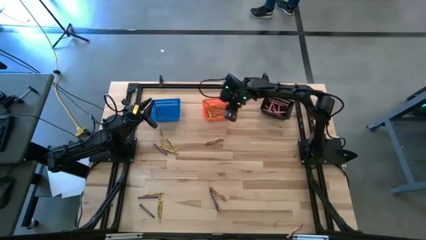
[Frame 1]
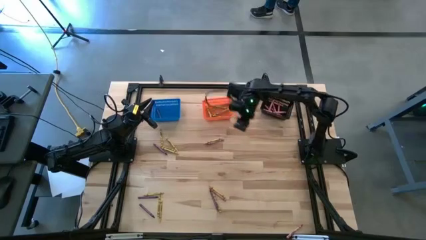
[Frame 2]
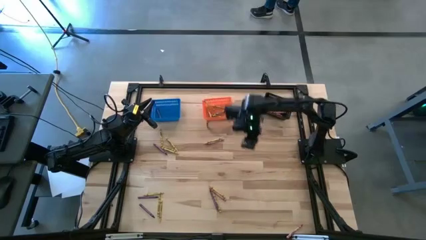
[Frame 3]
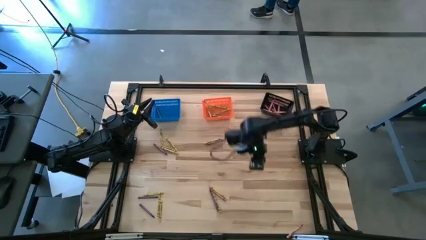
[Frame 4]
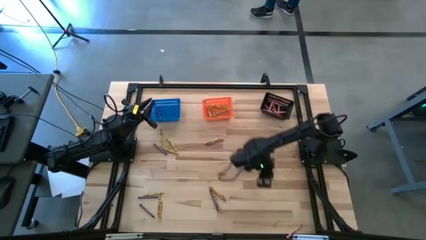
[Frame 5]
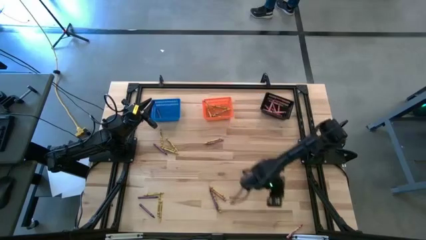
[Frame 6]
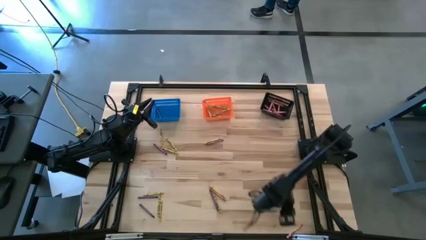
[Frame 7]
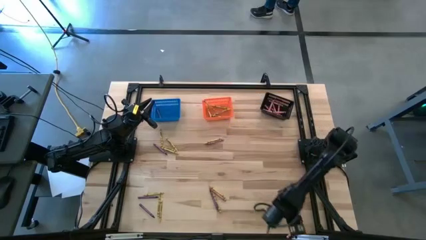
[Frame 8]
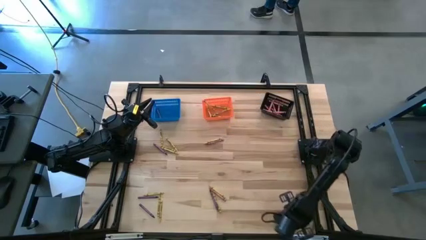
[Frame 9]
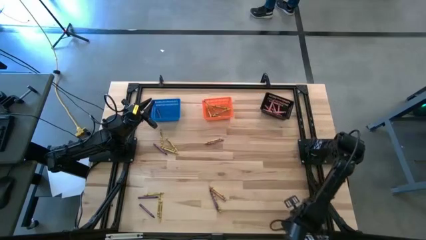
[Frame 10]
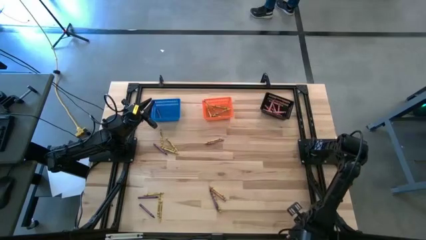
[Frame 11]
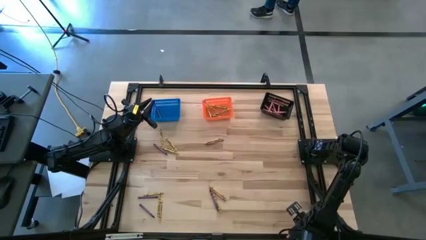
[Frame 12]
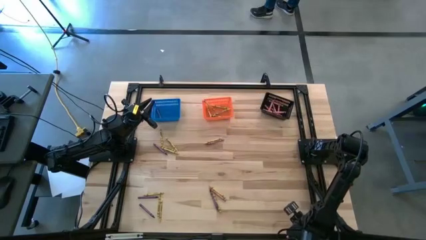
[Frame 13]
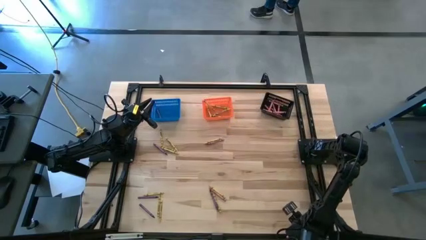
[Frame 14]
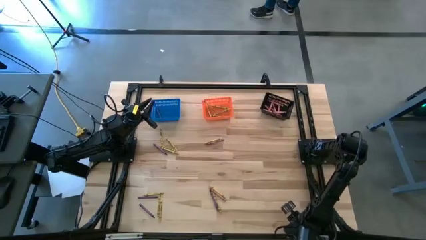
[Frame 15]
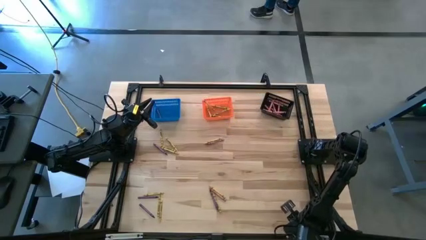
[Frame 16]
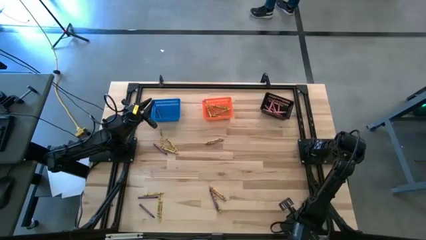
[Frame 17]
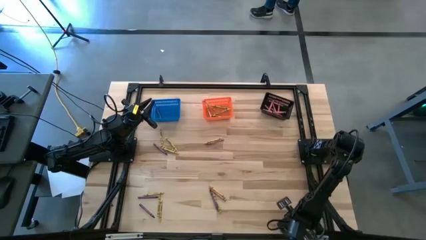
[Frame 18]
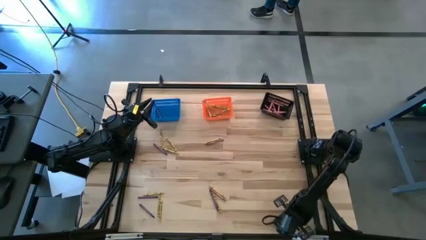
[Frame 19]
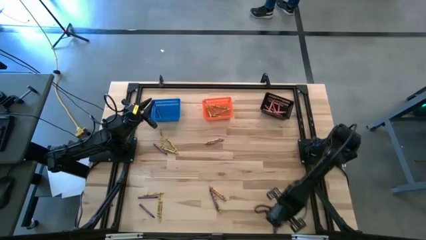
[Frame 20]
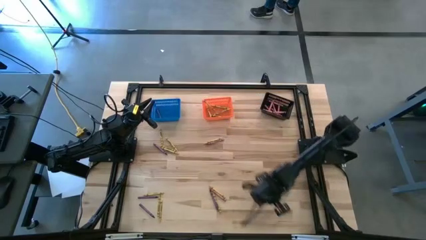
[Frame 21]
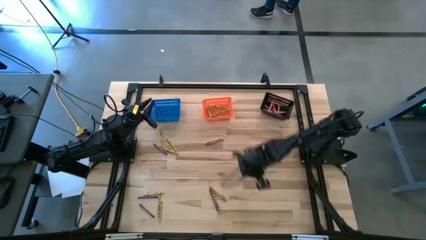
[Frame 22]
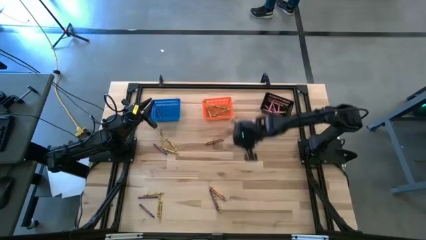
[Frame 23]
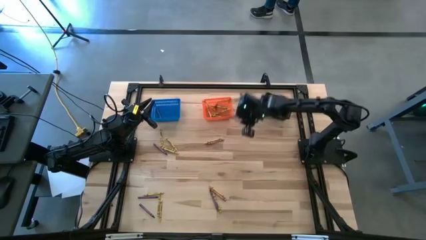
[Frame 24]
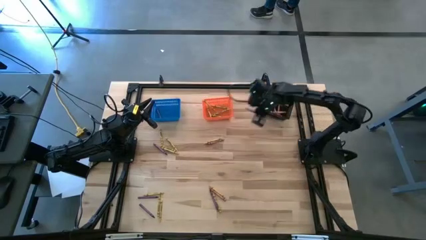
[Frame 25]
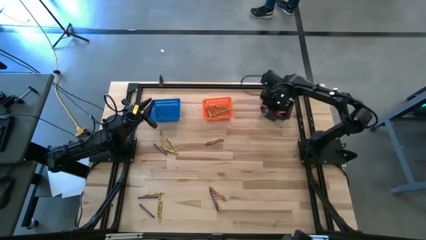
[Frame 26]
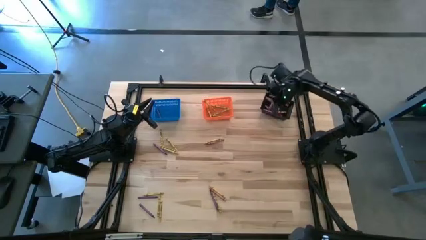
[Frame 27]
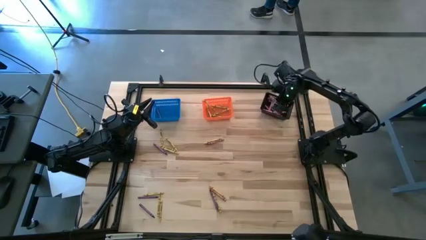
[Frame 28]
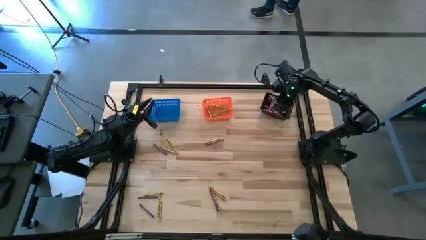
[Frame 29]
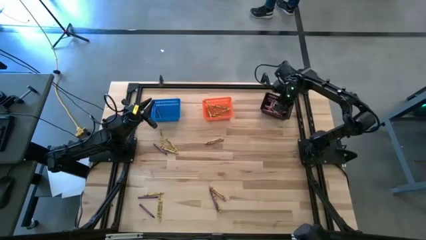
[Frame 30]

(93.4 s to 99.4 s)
Task: Sort crayons
Put the bottom red crayon into the black bin

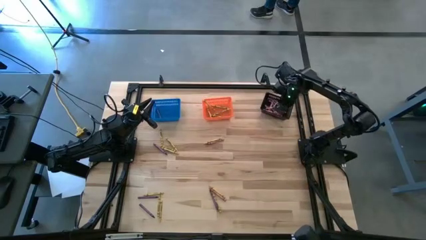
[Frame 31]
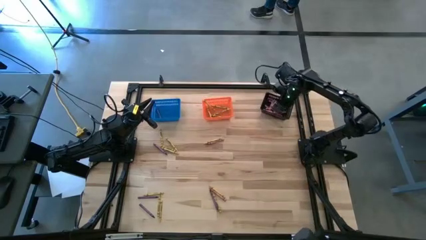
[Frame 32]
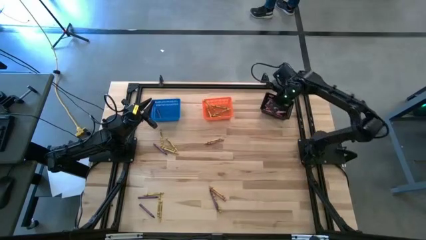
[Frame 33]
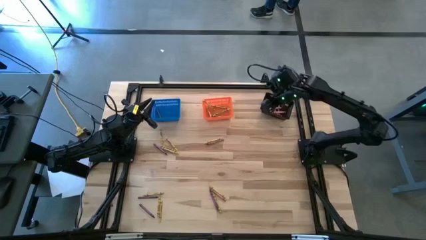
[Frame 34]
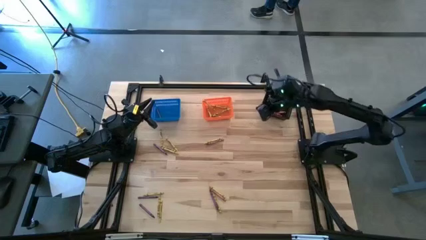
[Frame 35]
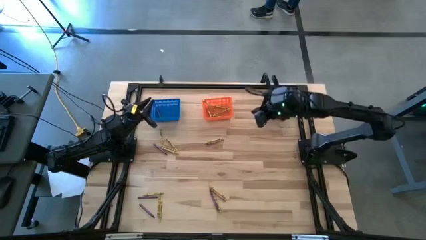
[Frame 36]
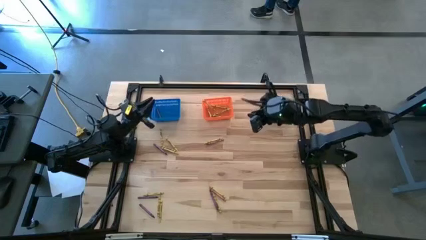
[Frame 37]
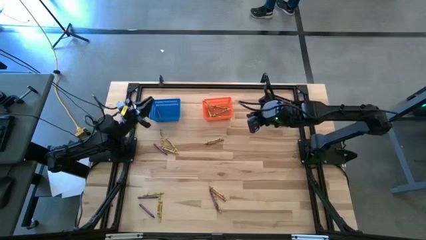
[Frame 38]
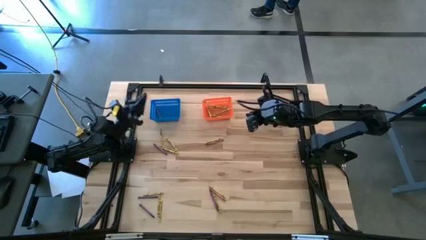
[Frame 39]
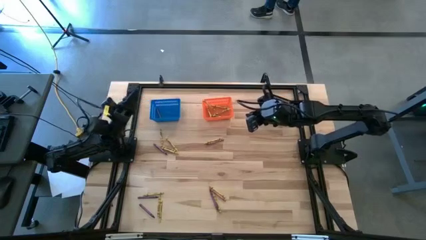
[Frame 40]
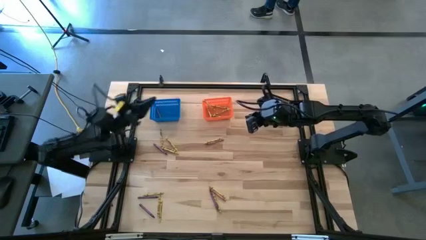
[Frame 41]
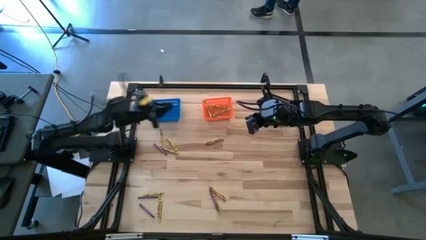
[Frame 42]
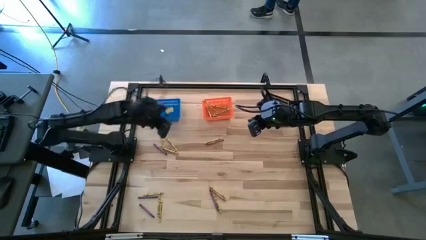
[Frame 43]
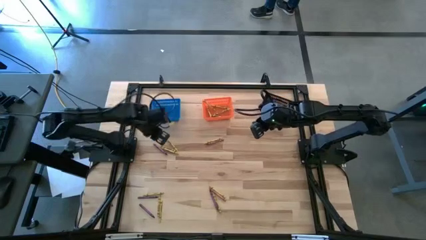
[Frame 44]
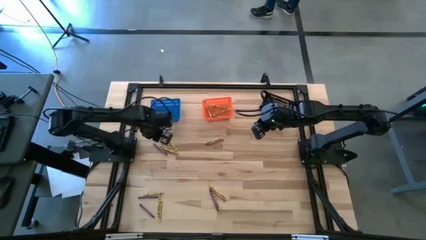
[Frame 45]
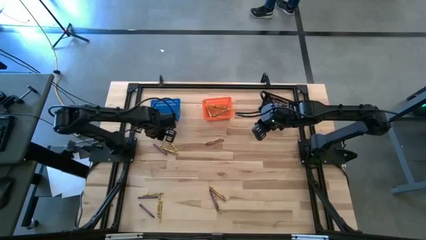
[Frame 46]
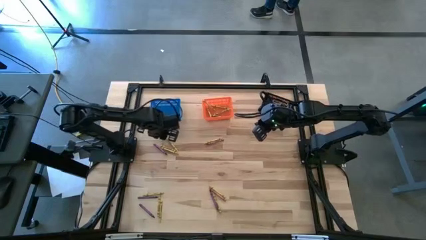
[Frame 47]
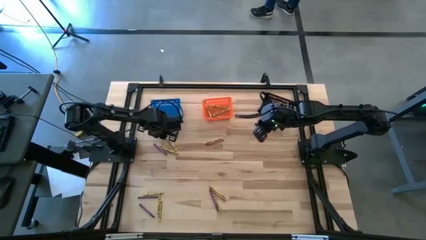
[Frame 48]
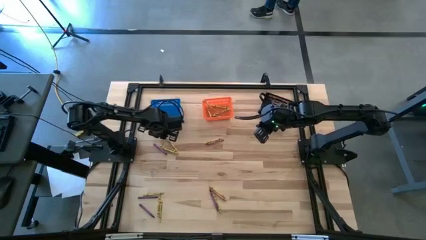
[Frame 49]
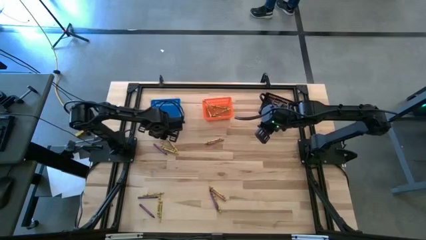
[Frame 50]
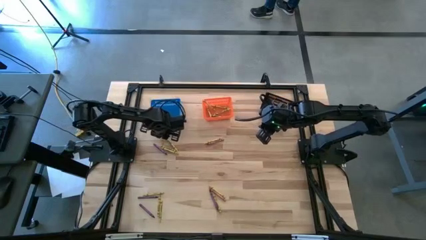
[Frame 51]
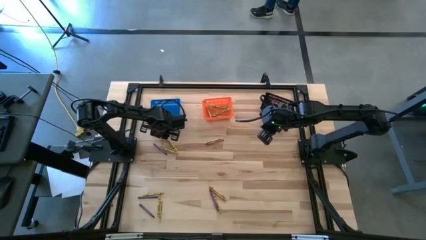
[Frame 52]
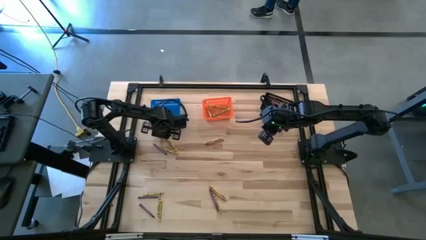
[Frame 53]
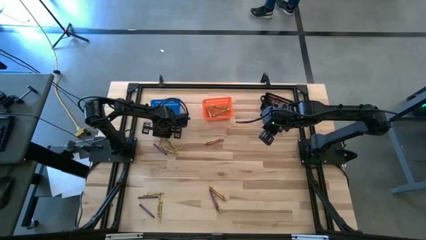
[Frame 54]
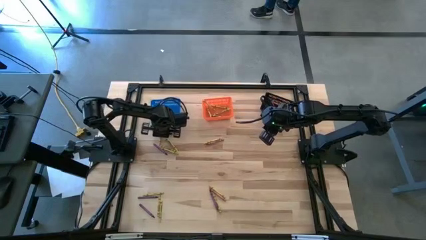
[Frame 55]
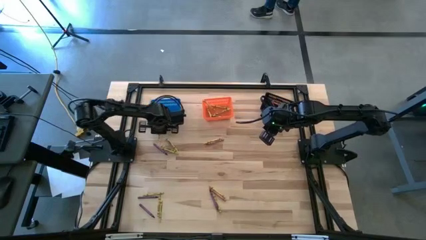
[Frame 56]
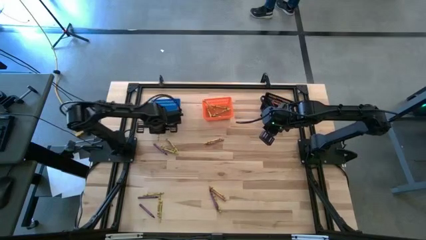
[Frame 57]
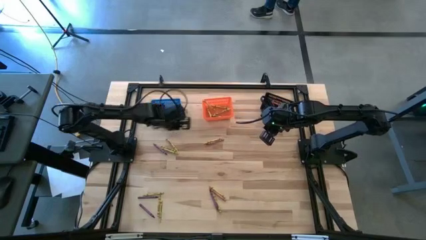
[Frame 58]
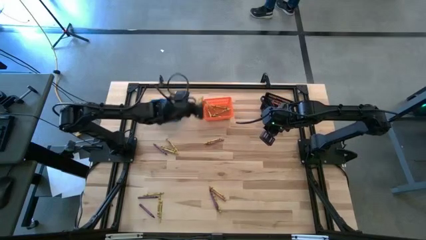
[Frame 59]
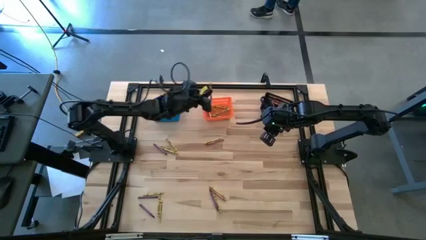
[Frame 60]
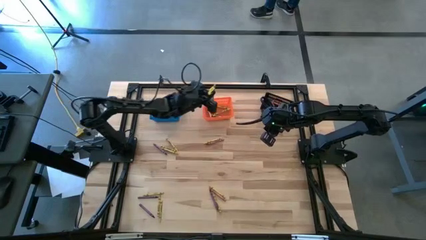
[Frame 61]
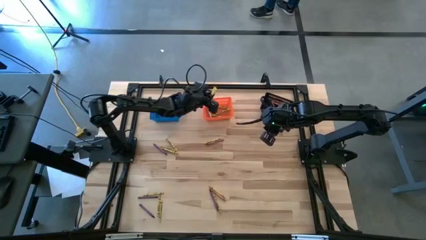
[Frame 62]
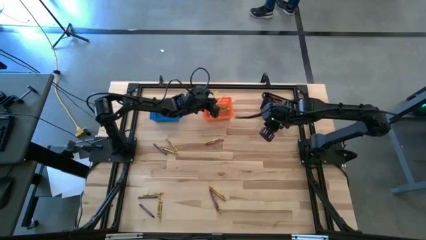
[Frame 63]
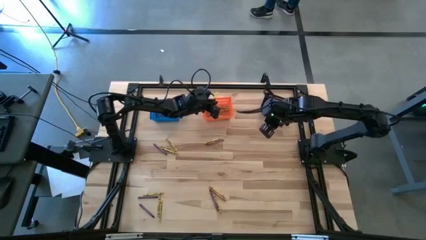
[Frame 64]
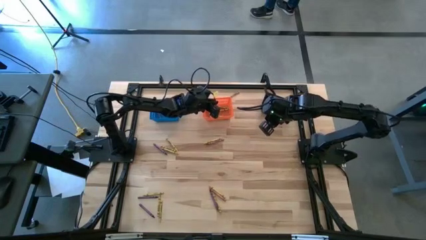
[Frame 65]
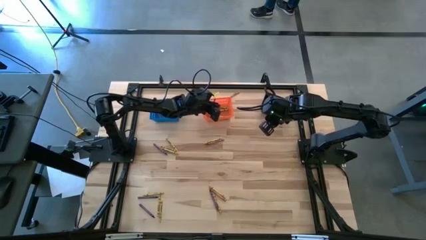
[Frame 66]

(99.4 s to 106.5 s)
Put the yellow crayon into the orange bin

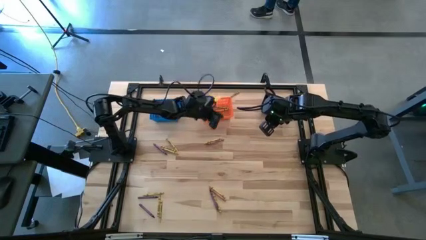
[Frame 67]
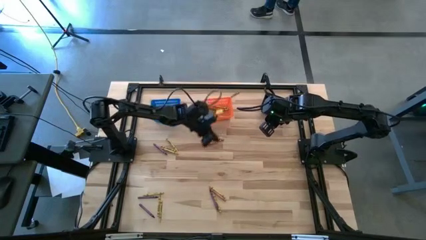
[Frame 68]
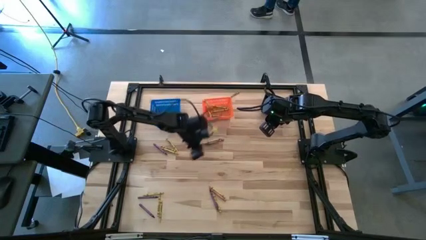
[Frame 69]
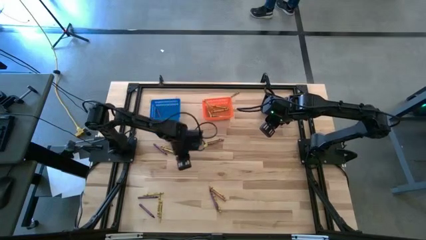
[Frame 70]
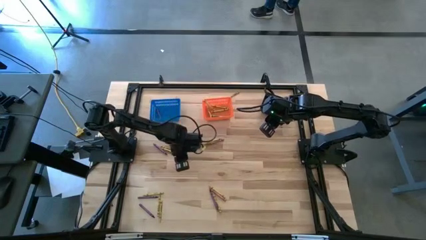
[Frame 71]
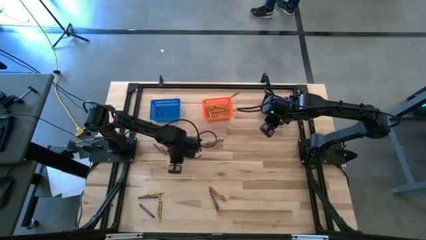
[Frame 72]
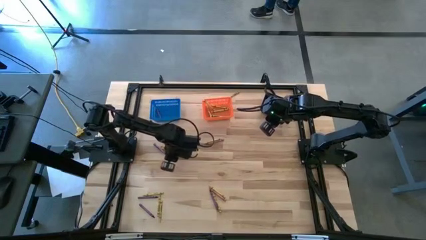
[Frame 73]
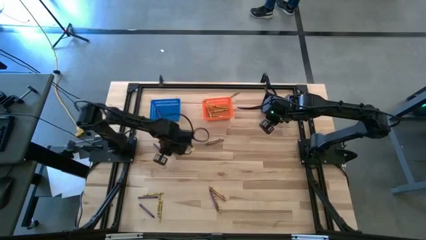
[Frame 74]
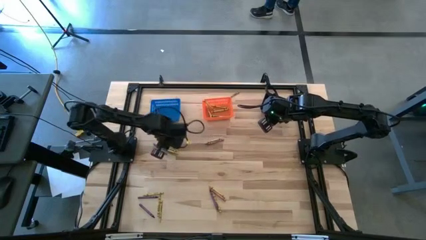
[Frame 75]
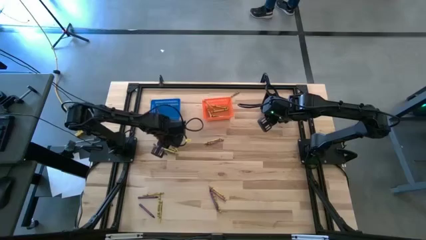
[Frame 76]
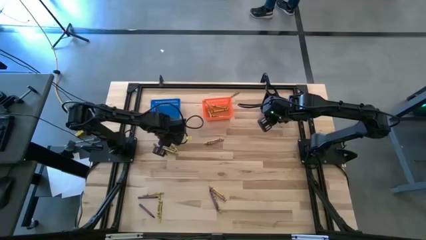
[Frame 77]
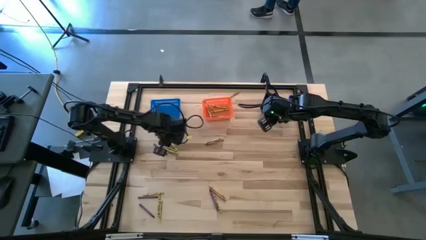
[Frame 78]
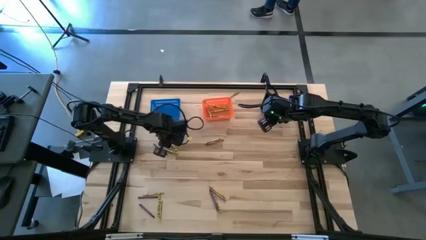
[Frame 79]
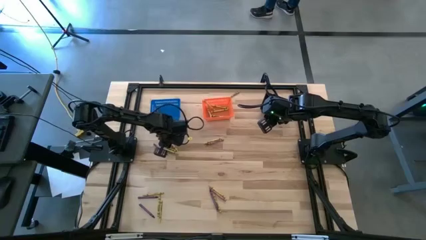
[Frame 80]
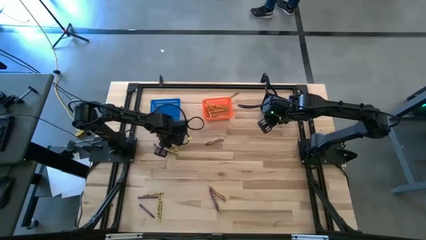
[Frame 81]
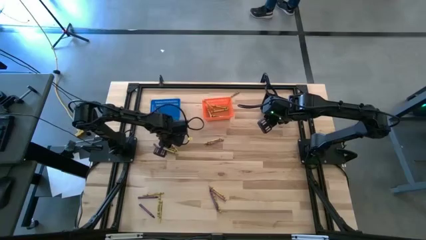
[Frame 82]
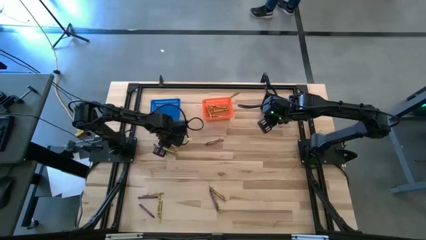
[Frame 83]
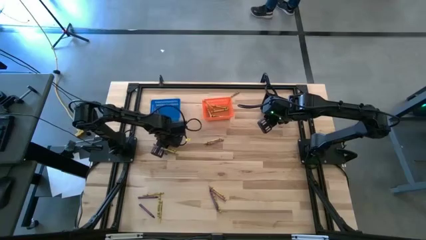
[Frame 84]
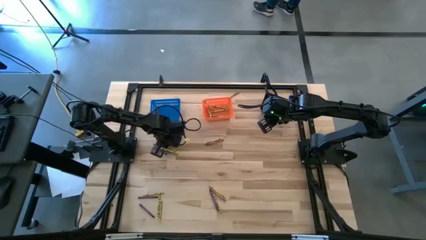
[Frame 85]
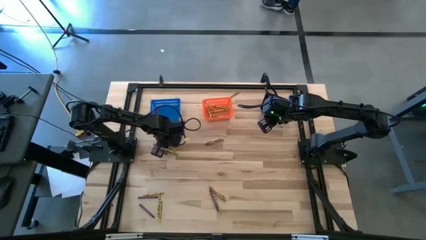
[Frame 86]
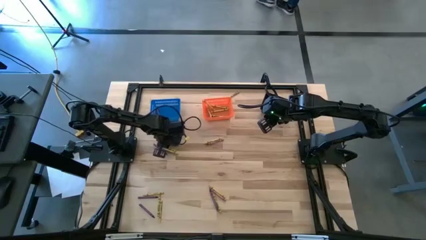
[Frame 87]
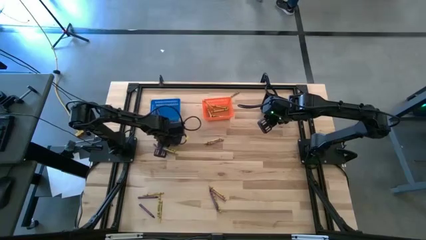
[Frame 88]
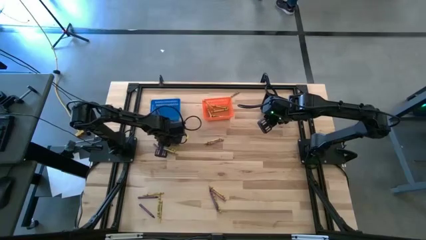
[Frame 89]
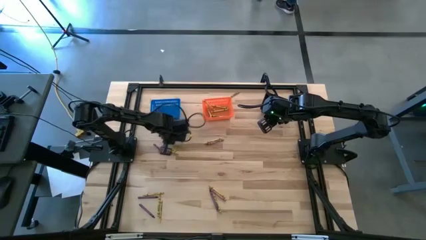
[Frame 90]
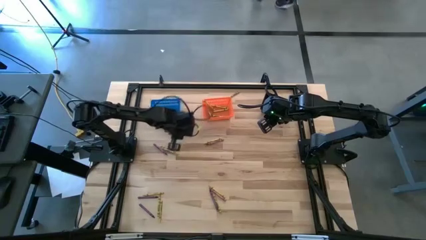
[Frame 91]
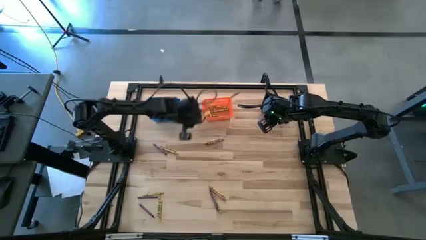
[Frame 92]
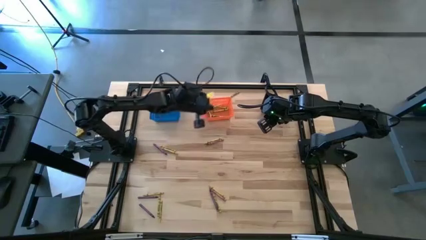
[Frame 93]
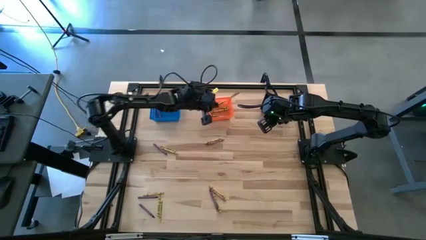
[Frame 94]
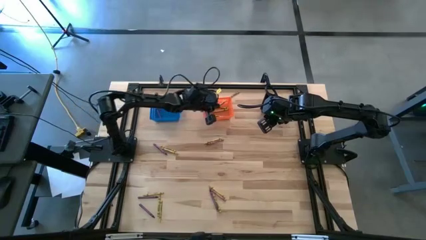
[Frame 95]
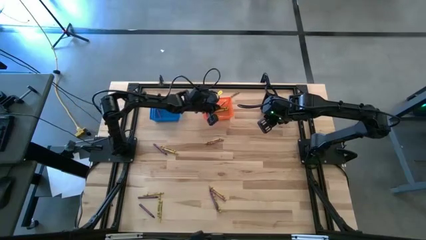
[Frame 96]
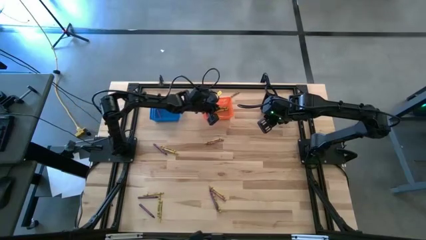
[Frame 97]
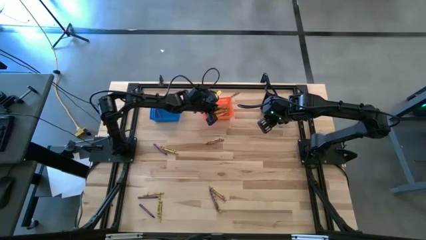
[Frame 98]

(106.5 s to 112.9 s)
Put the yellow crayon into the orange bin
